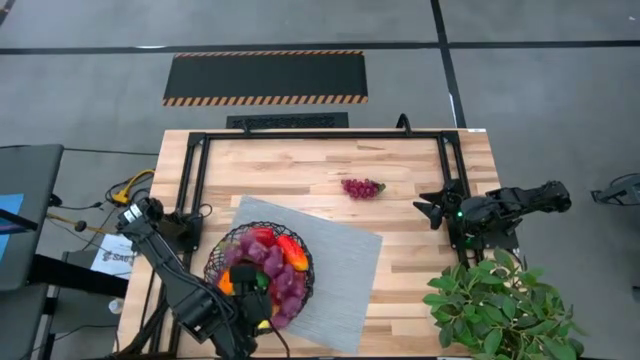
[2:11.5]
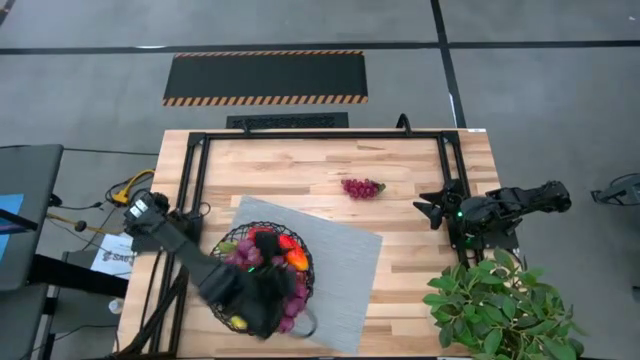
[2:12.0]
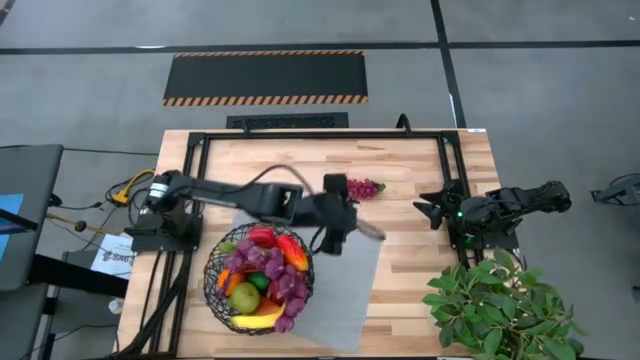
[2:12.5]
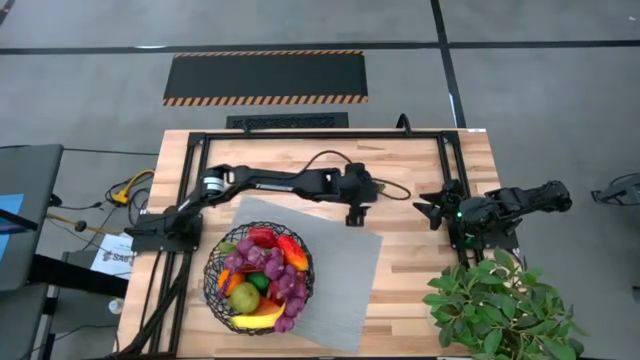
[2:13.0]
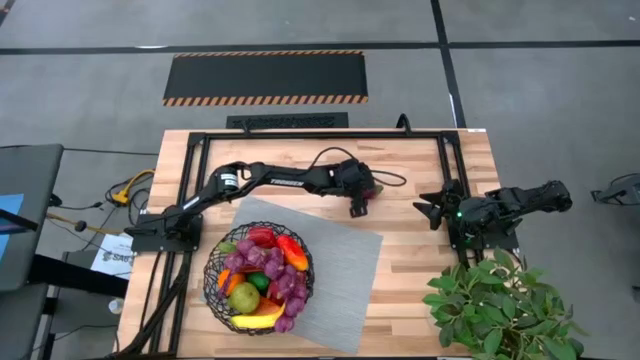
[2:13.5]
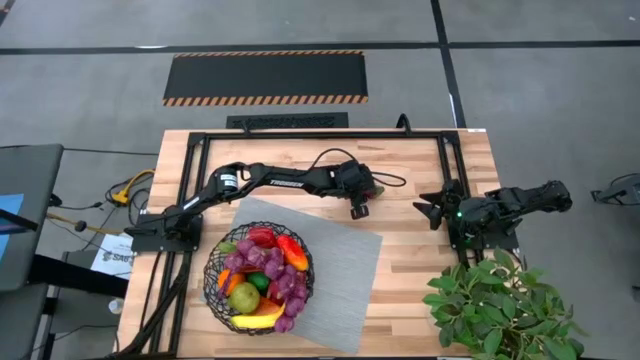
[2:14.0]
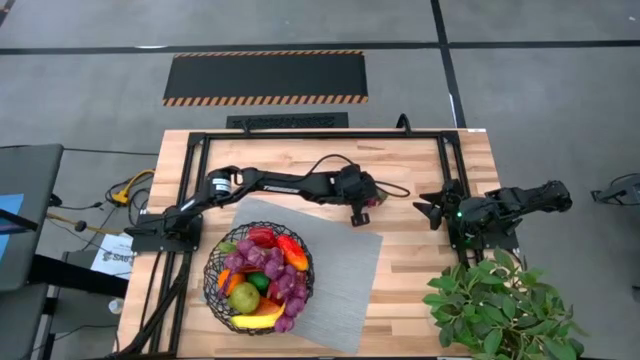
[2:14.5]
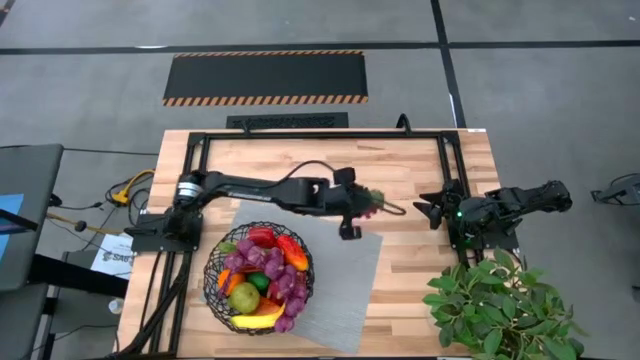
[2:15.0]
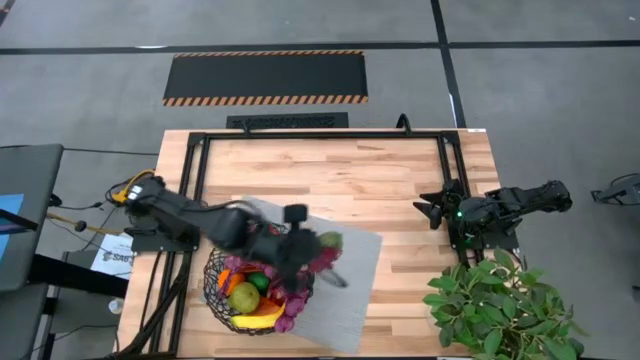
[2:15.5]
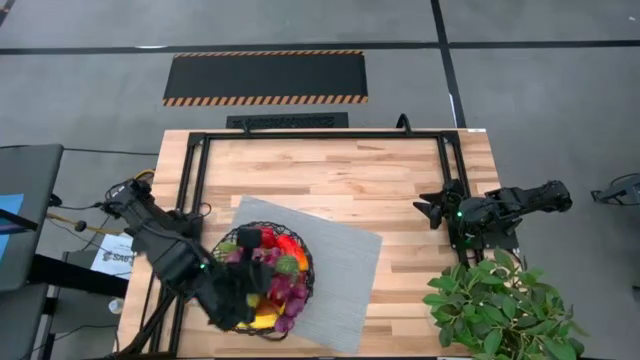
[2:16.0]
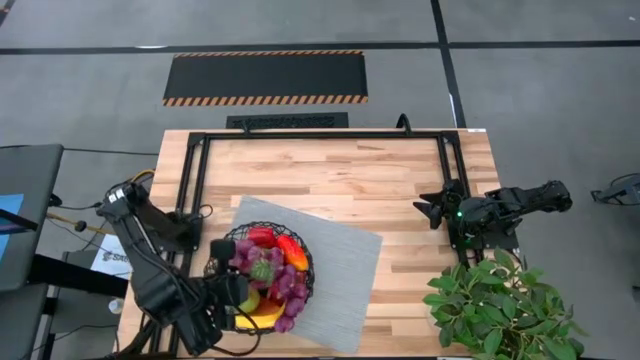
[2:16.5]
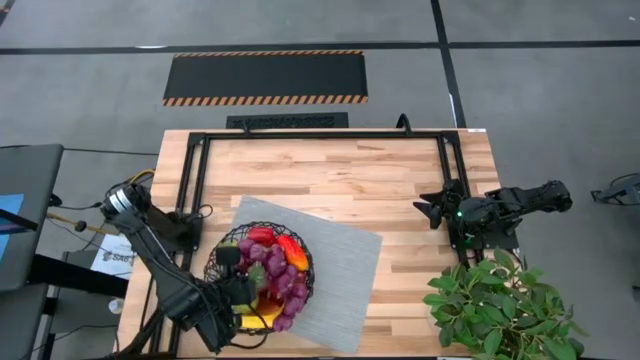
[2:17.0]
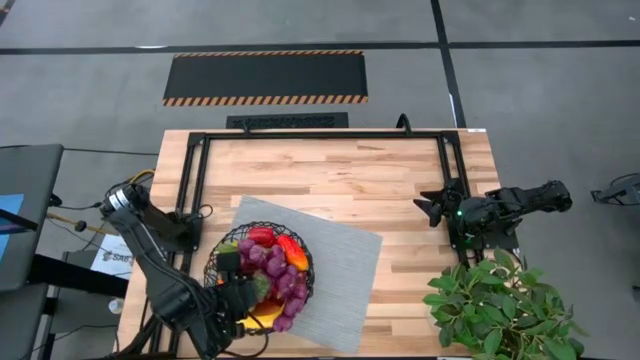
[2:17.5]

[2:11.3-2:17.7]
Task: Build produce basket
Put the purple grapes into the mesh basket

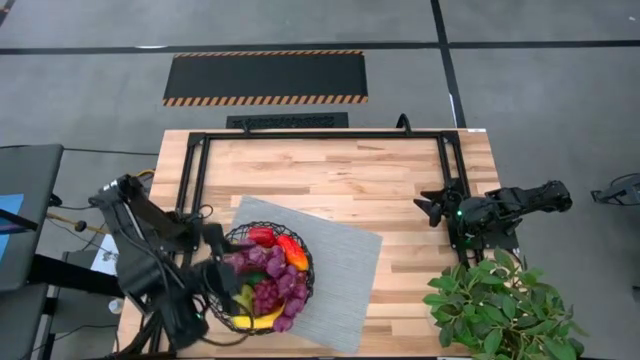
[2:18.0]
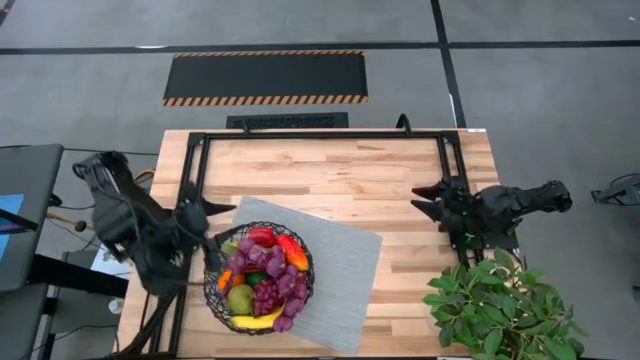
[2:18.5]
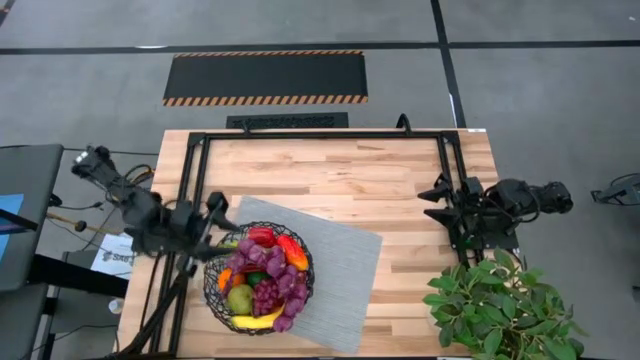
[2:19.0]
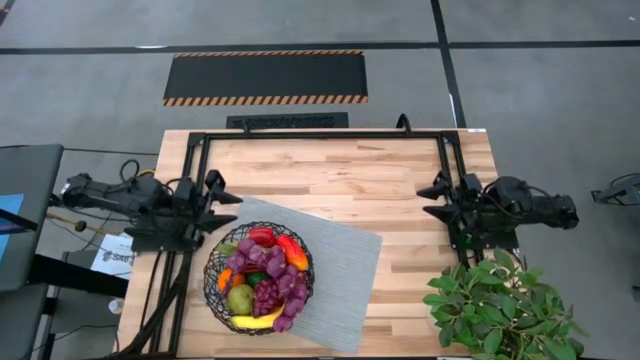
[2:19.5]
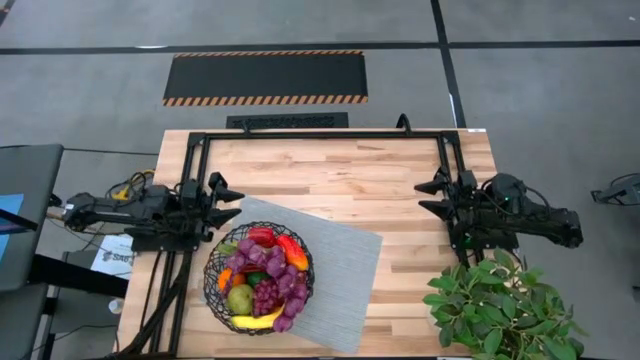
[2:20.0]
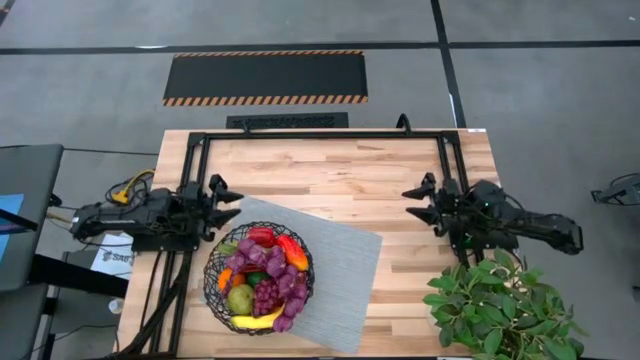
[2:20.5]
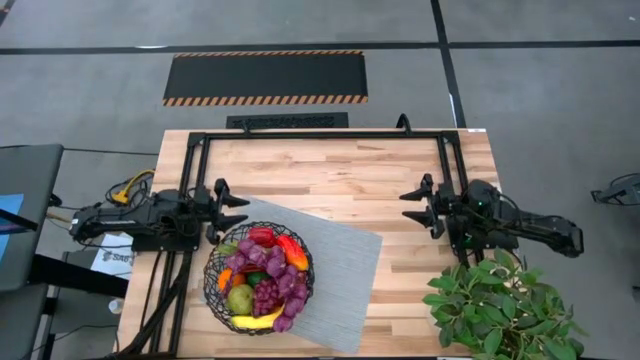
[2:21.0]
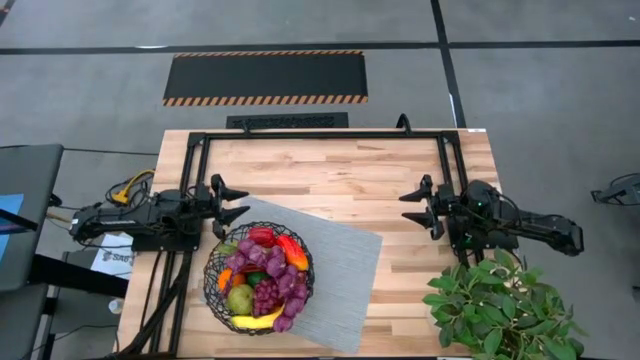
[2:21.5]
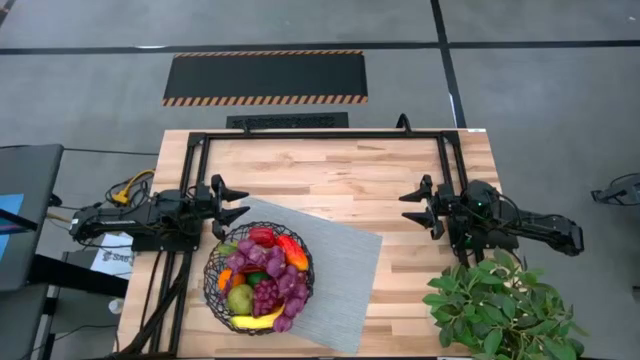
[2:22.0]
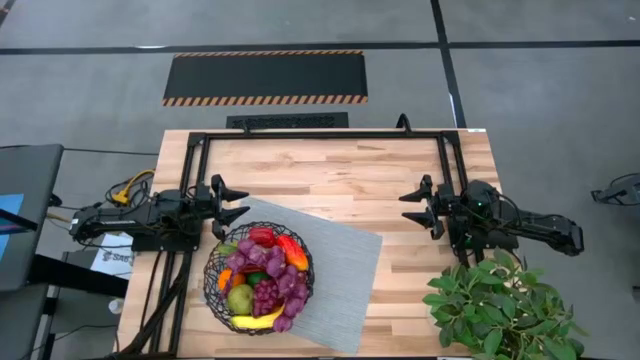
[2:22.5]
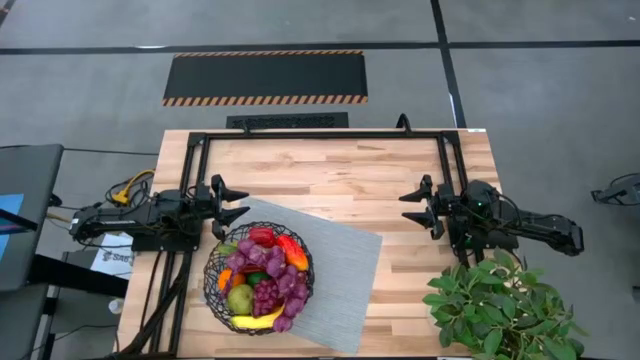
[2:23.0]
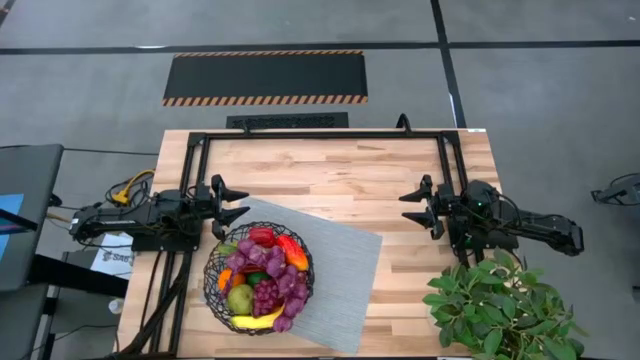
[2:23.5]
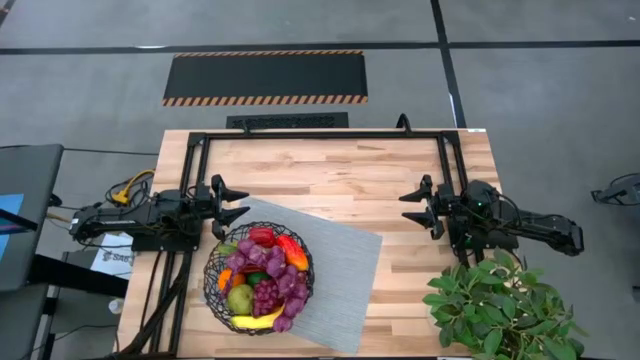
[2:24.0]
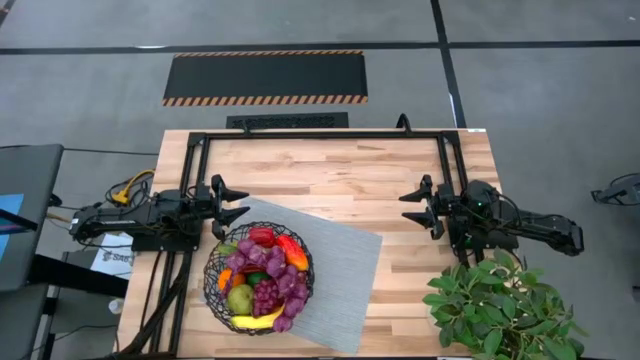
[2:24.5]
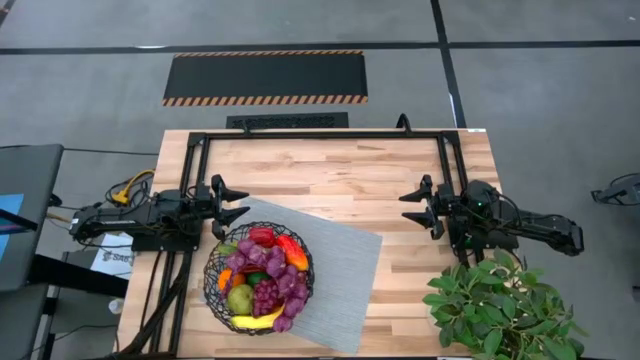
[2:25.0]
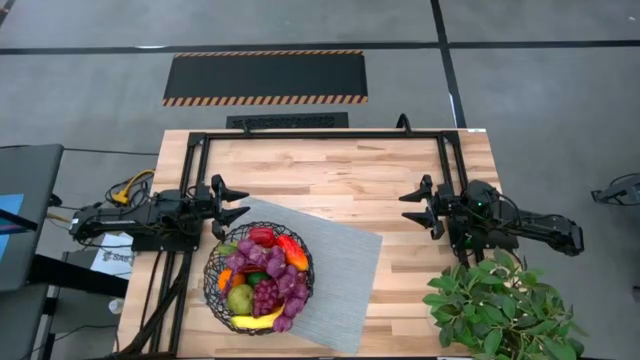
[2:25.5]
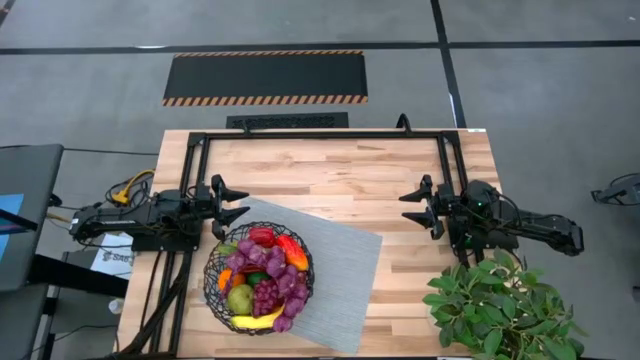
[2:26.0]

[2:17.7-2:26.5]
Return to Home Position

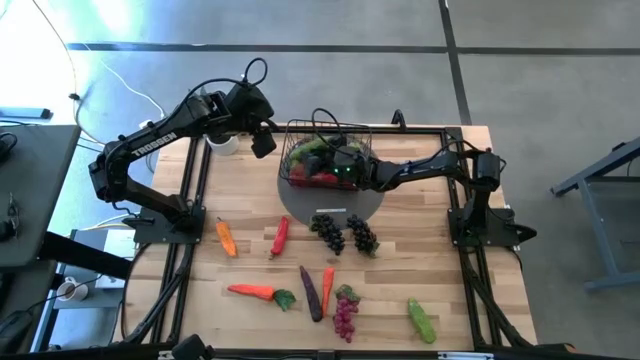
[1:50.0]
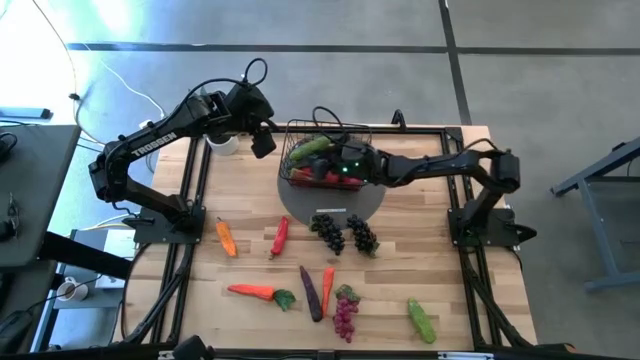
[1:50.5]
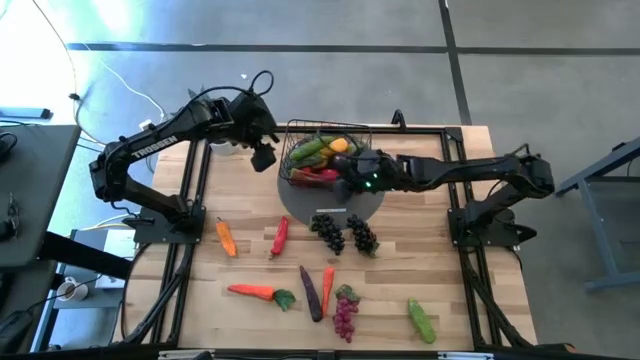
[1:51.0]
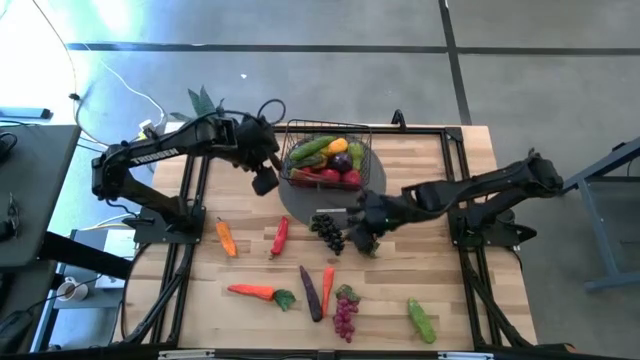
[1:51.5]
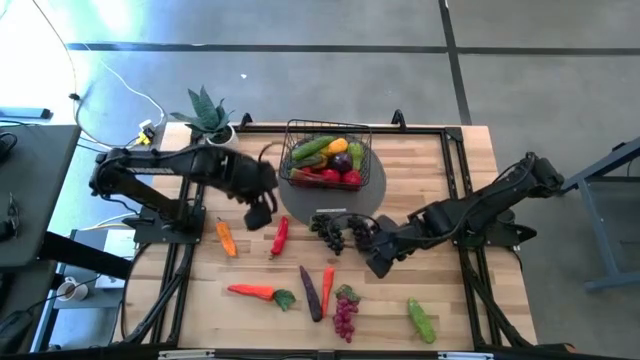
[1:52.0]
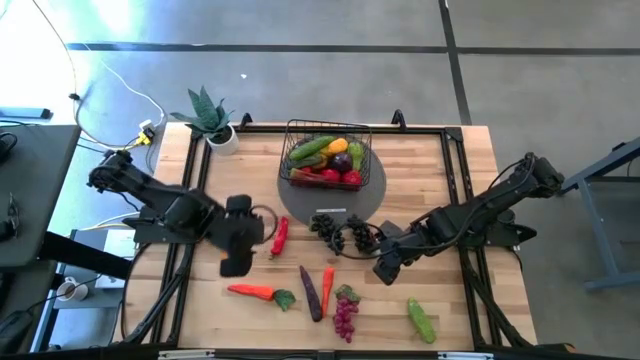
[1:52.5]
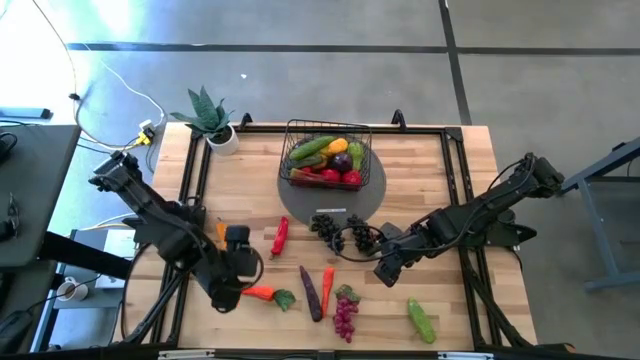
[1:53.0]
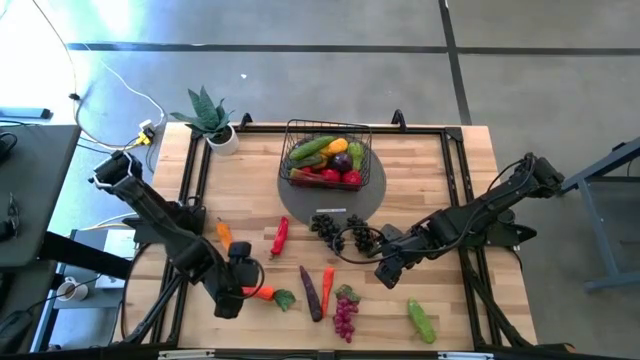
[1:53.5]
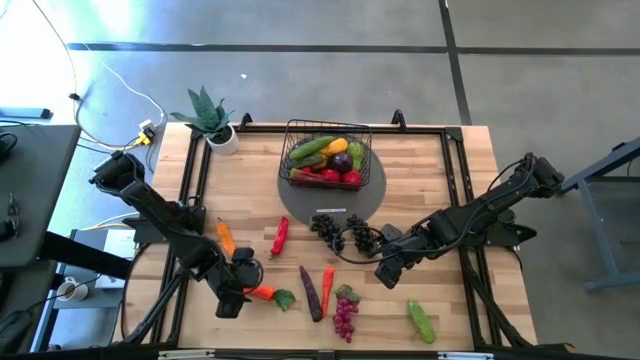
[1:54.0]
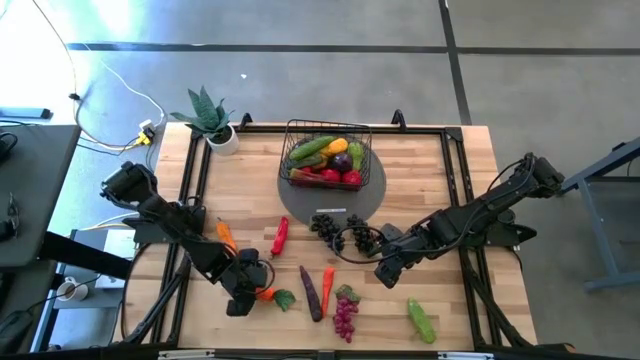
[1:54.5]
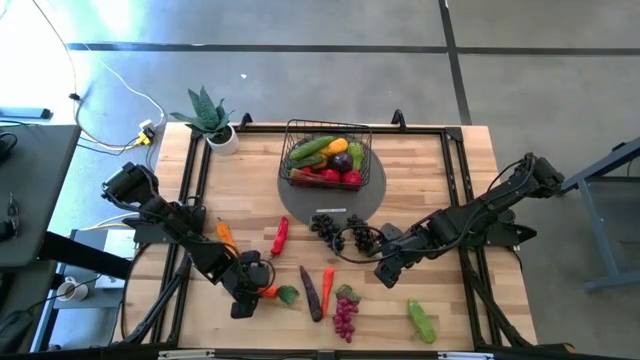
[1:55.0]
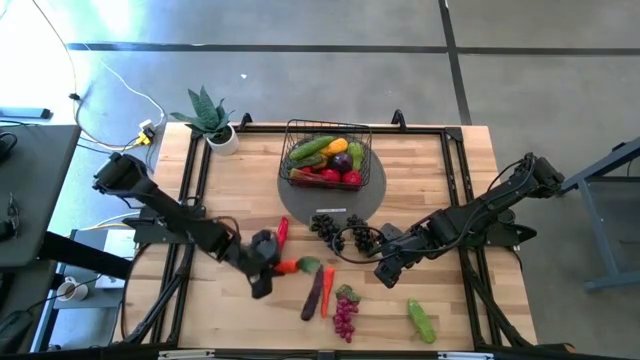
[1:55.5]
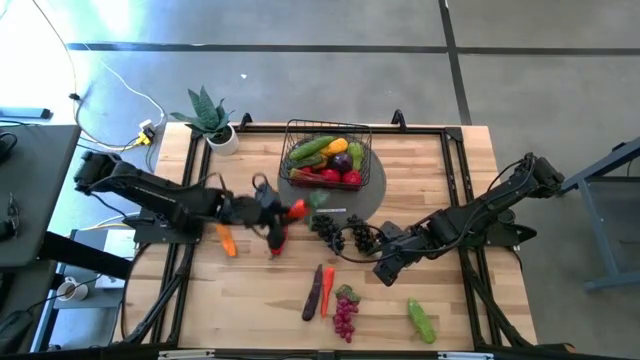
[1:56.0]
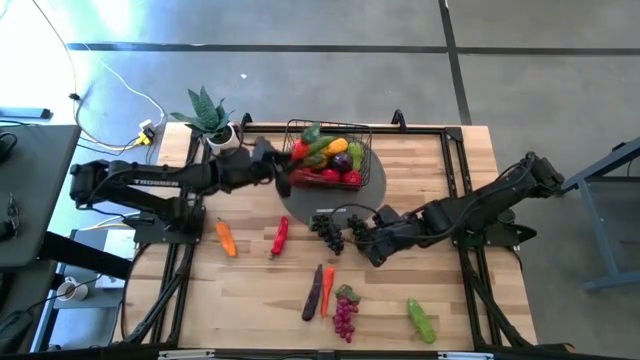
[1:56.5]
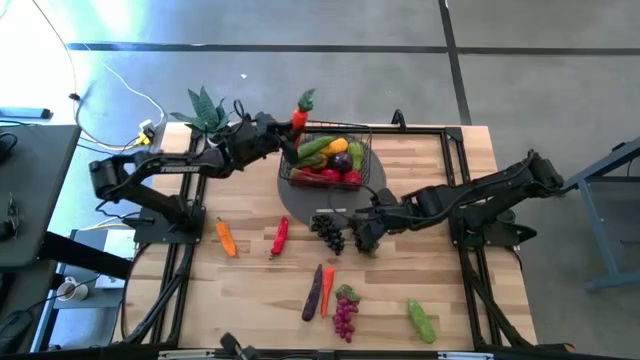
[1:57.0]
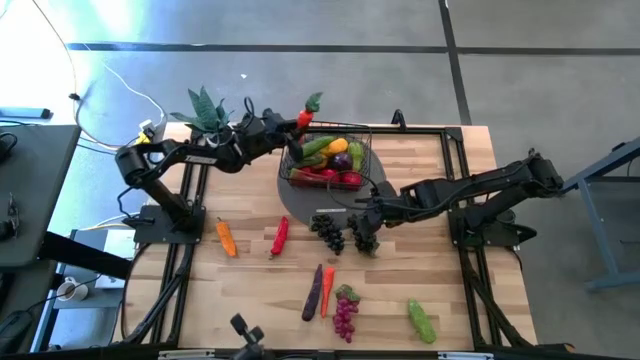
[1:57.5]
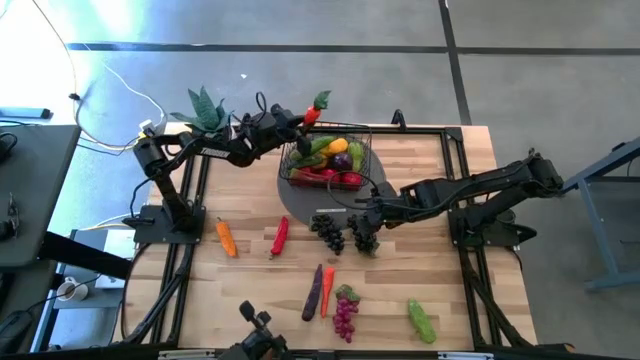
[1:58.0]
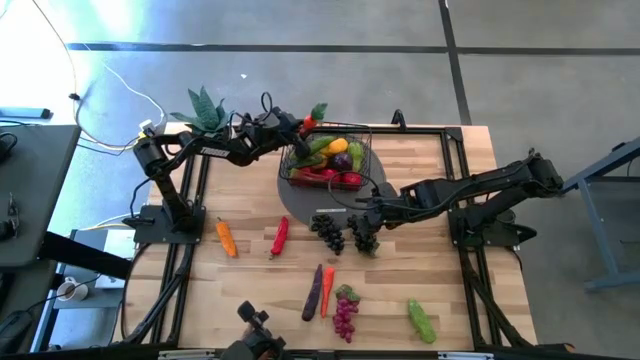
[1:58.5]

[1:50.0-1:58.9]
Task: Build produce basket
Put the orange carrot into the wire basket
